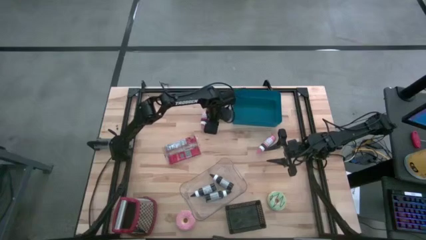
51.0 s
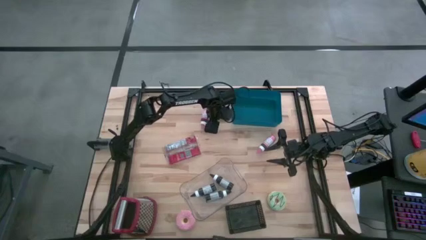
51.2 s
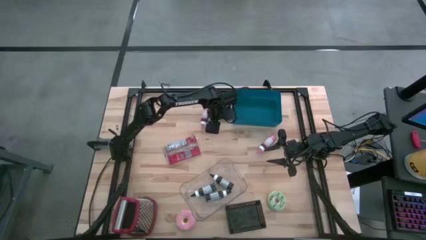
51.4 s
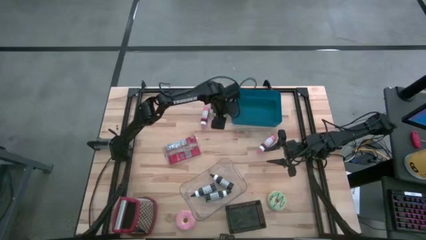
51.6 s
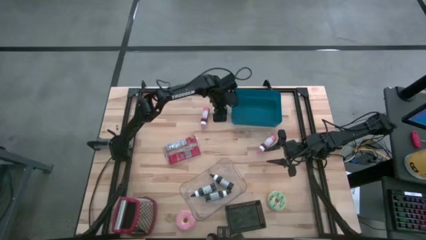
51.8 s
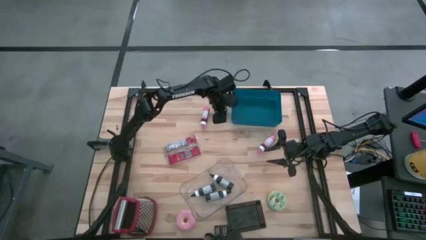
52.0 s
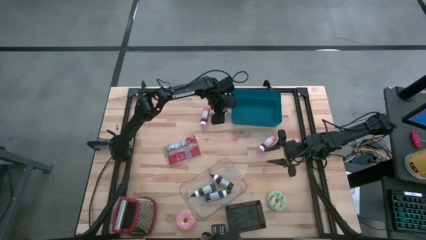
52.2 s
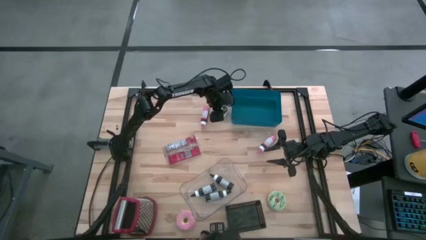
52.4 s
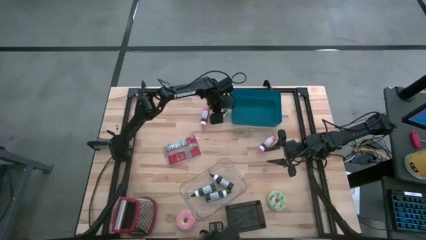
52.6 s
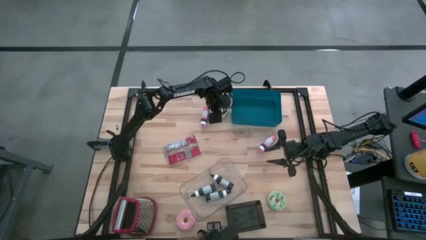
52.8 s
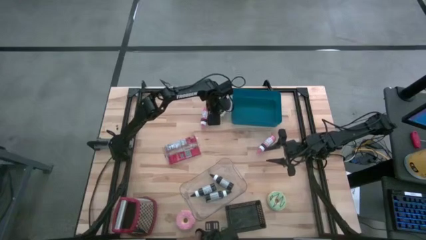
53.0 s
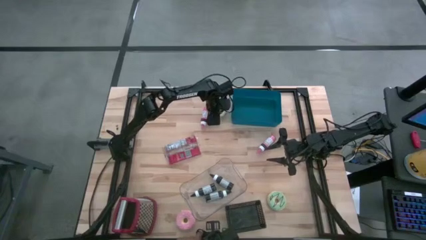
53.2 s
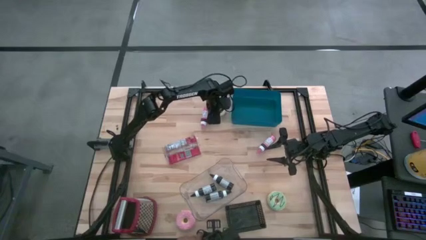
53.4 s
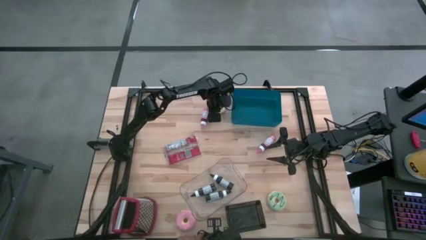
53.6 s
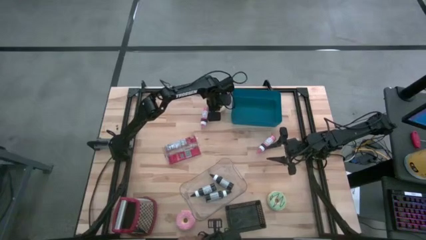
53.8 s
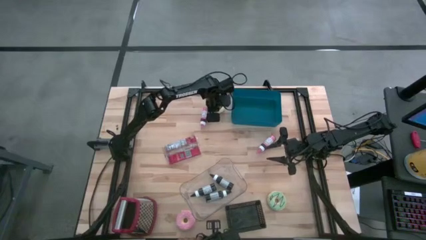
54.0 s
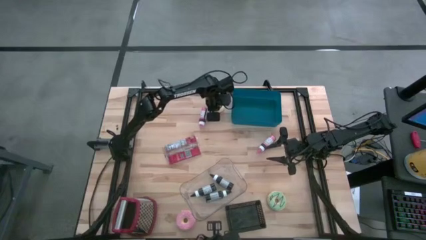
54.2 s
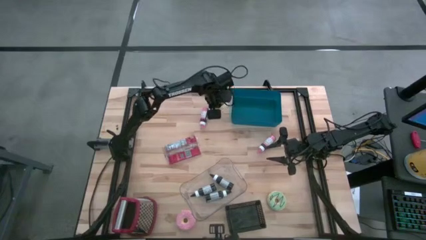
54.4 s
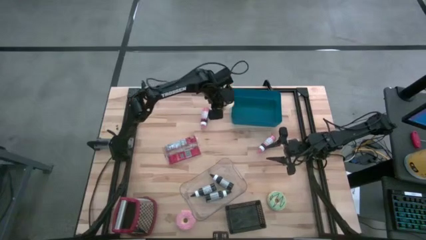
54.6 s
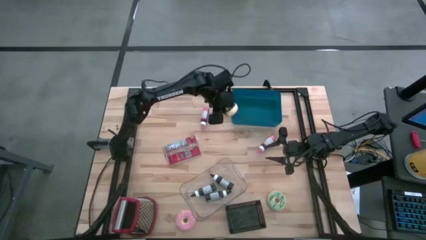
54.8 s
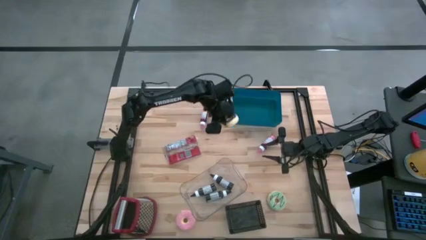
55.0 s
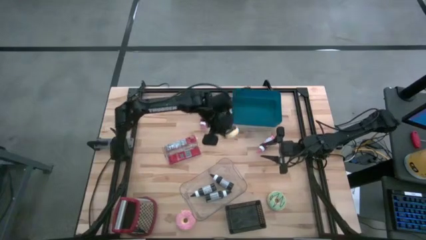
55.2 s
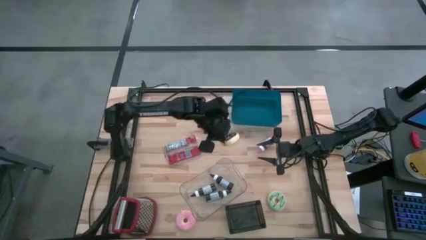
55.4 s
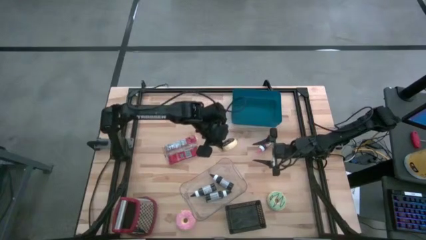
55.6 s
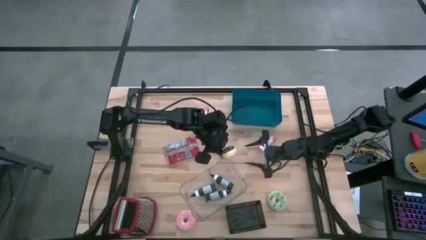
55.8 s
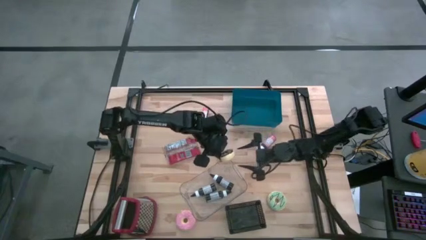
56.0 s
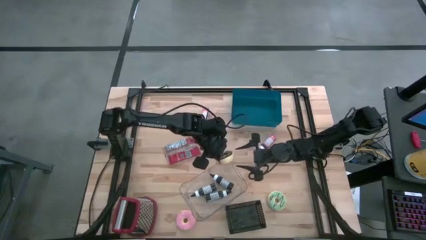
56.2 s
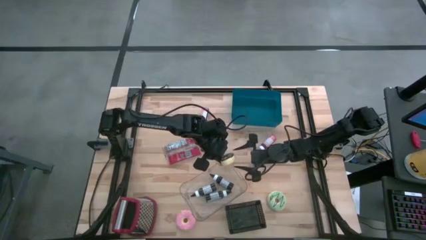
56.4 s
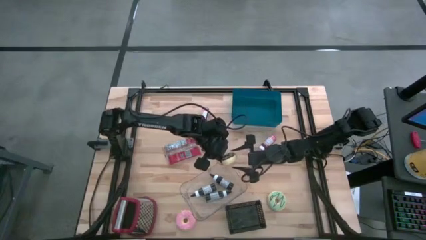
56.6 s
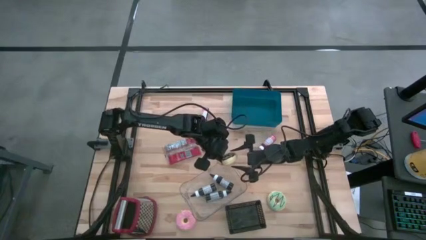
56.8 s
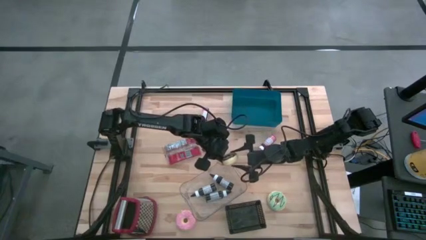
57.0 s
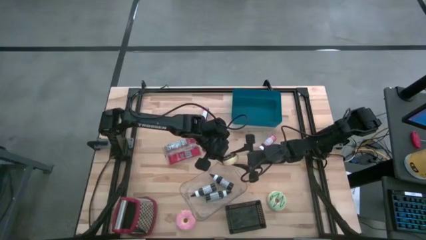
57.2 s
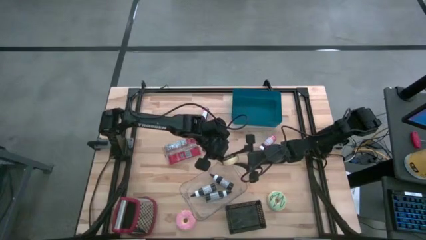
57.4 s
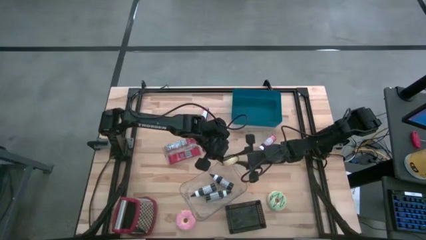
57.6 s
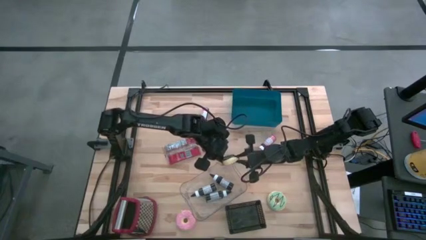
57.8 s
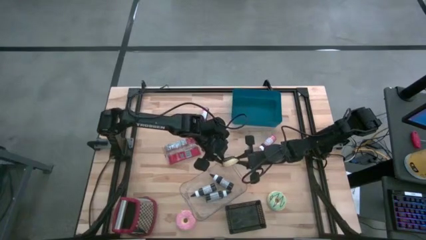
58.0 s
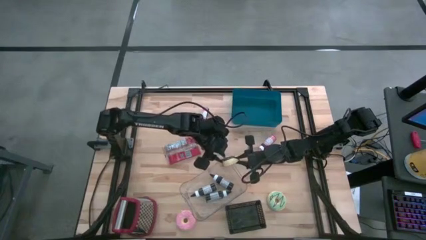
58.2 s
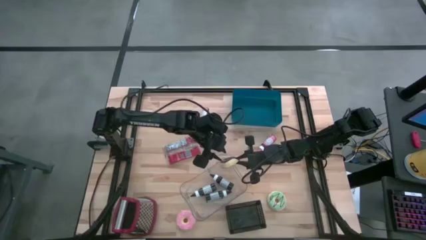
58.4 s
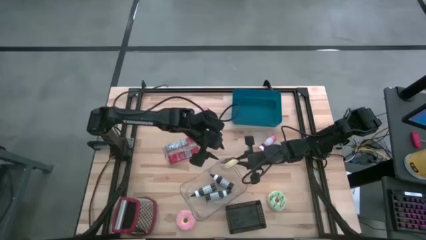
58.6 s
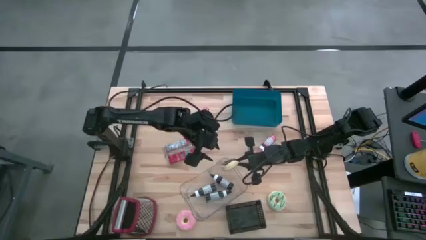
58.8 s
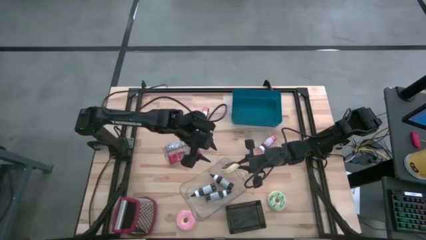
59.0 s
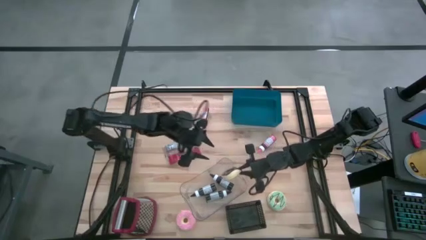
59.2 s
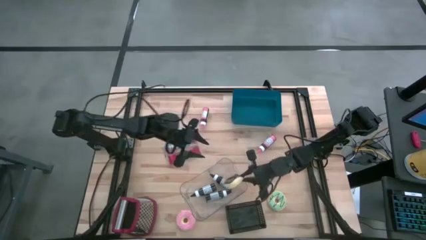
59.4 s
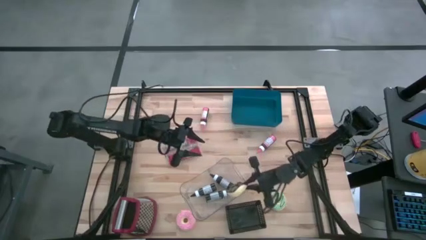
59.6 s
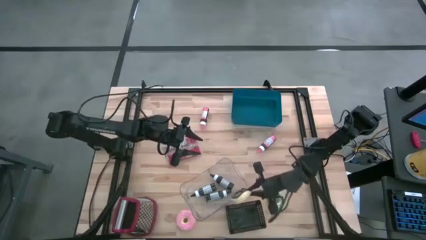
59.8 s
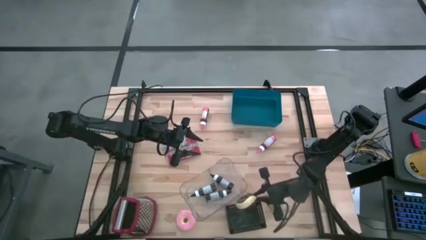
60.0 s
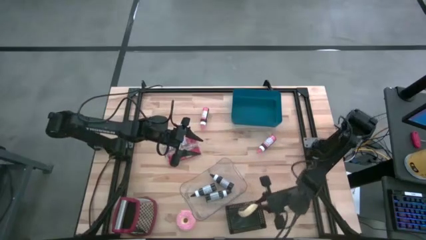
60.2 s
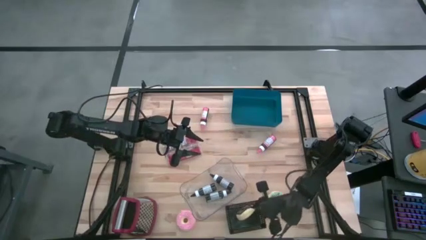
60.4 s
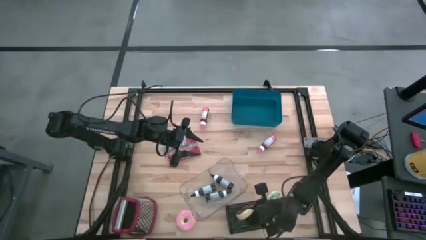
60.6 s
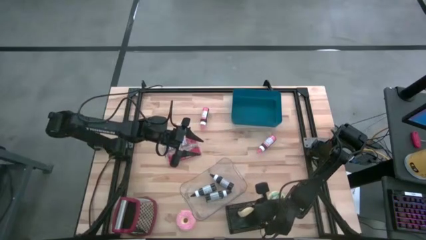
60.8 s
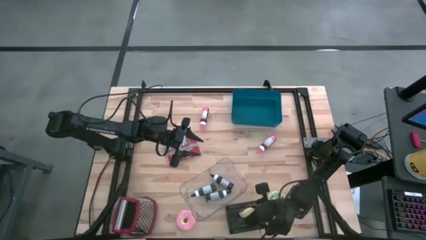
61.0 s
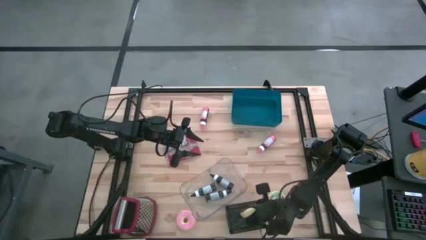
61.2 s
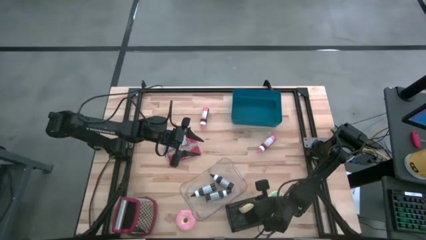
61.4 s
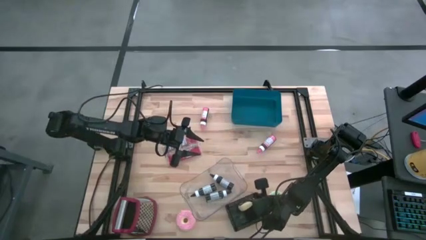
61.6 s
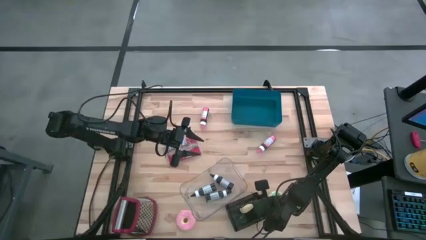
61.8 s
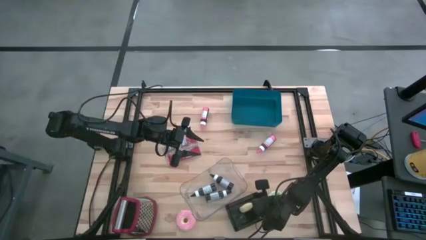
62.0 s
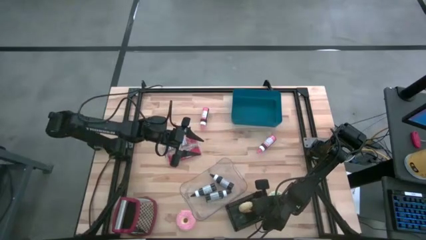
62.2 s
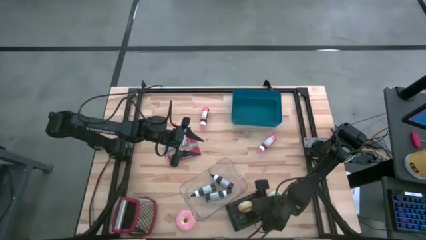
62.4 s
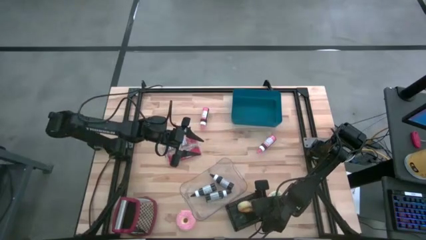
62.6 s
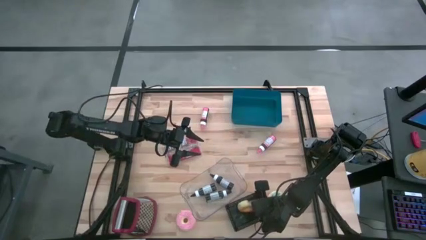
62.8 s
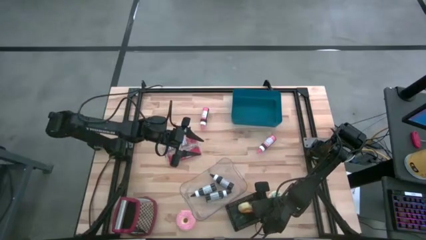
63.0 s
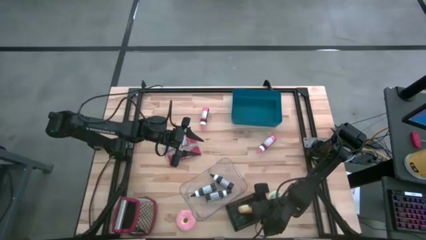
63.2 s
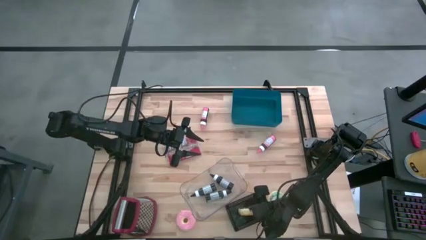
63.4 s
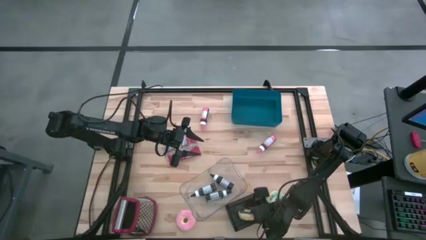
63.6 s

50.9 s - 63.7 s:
Put the black donut into the black basket

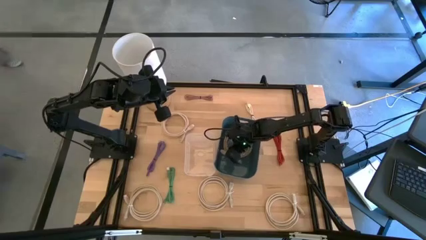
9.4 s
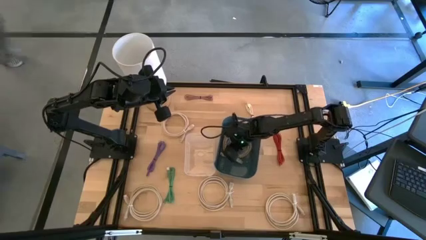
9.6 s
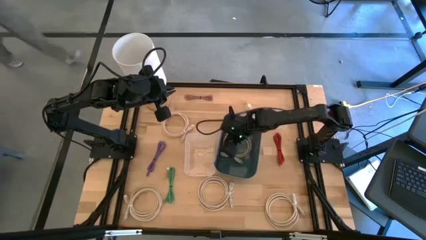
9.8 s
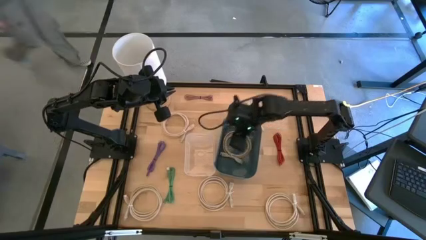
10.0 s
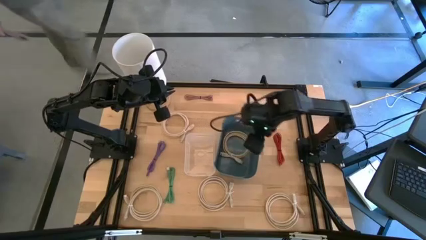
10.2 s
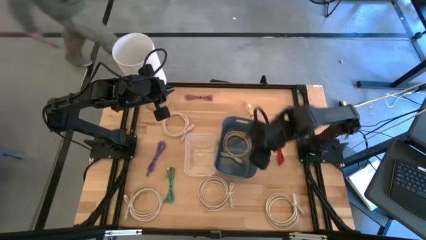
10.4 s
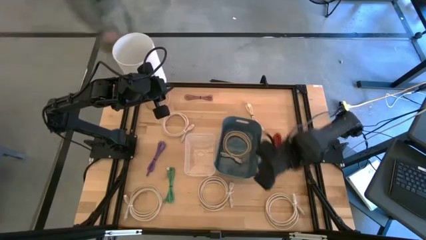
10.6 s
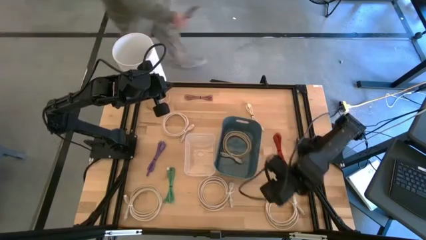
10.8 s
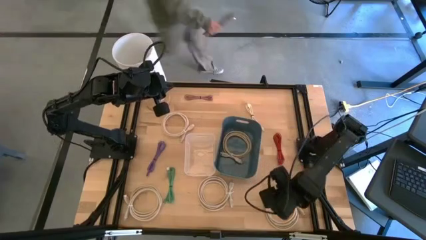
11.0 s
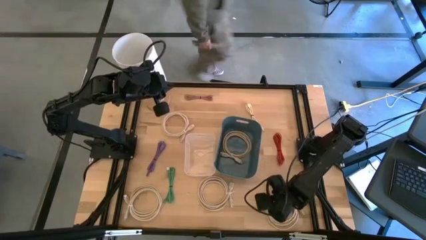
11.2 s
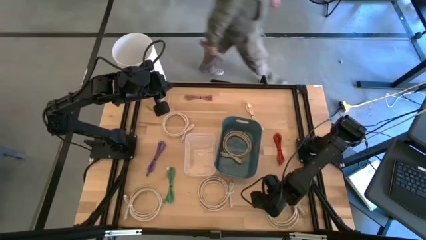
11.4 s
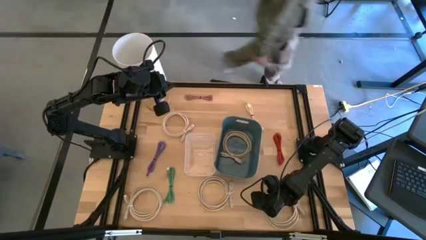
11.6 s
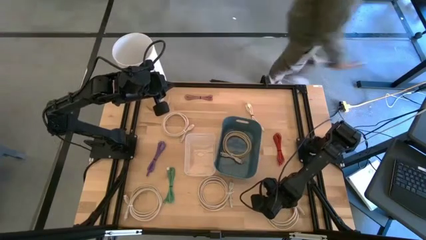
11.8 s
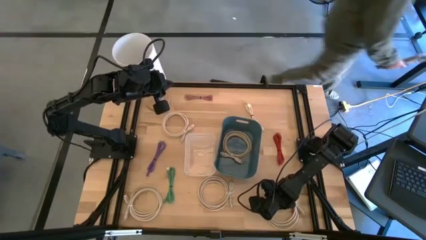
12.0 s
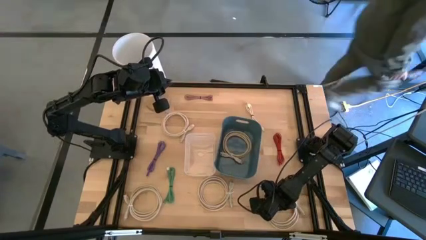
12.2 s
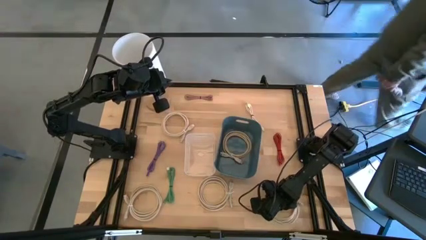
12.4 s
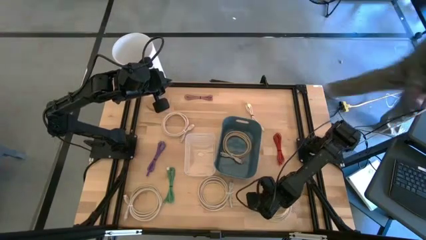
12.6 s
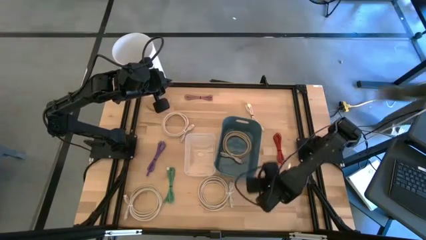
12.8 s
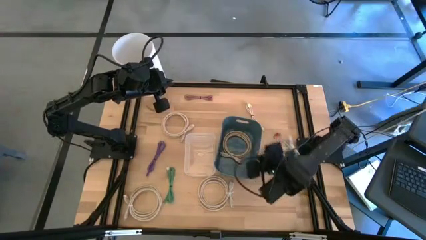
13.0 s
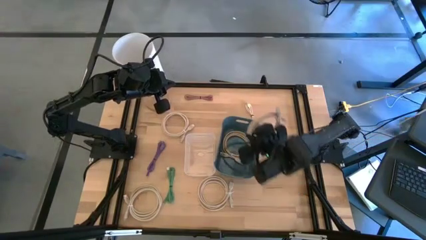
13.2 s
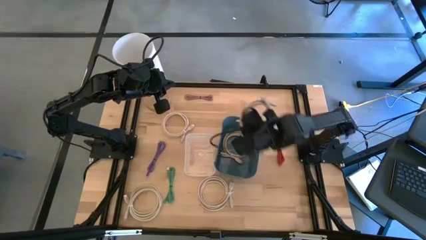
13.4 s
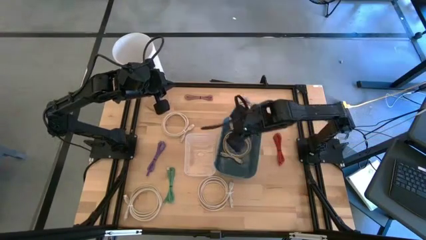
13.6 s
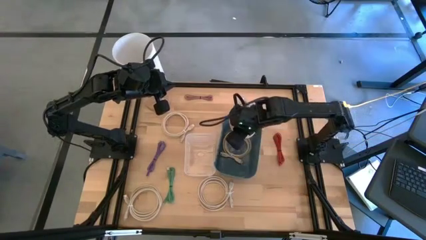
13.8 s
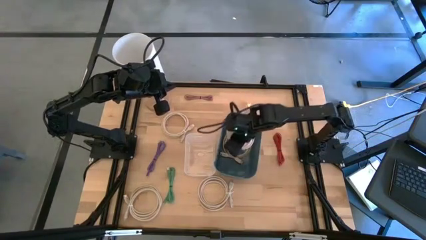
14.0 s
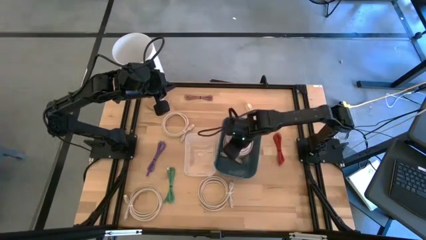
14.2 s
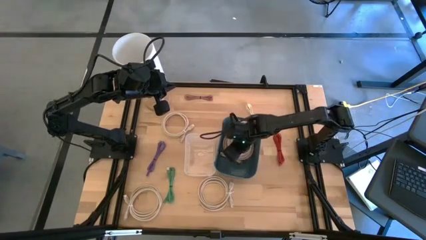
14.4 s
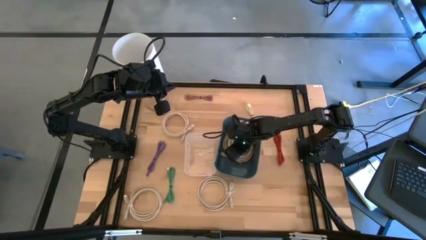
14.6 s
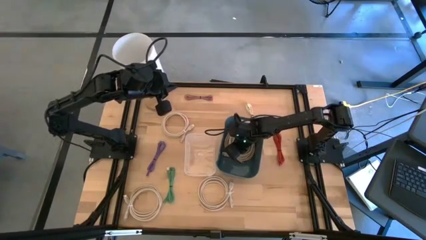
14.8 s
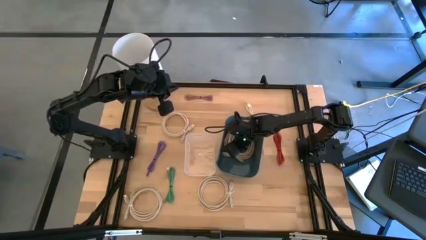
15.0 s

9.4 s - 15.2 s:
Put the light brown HDMI cable into the blue bin
